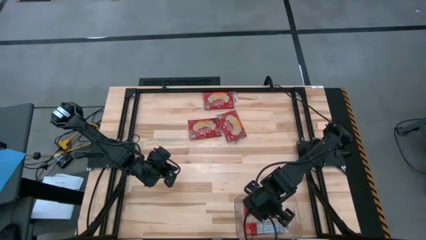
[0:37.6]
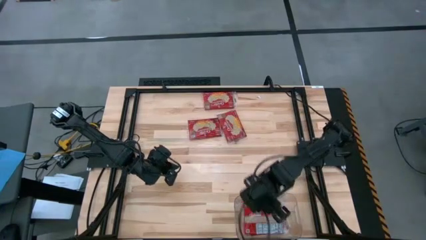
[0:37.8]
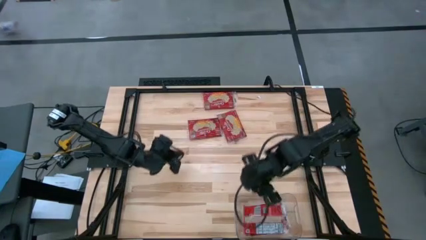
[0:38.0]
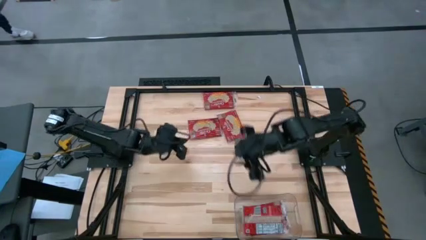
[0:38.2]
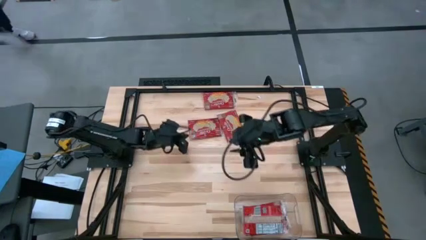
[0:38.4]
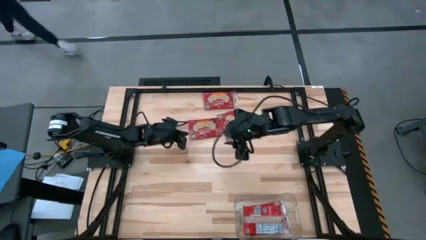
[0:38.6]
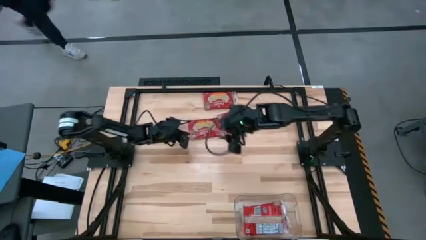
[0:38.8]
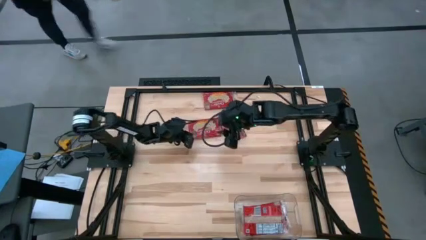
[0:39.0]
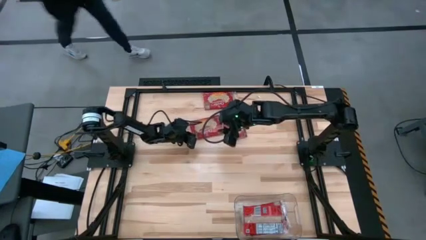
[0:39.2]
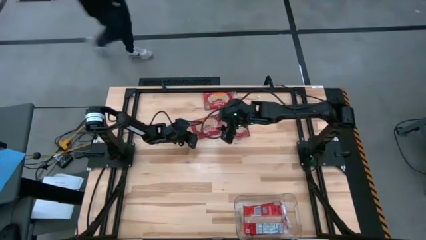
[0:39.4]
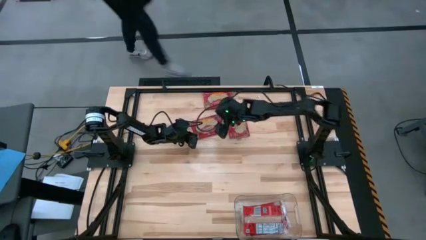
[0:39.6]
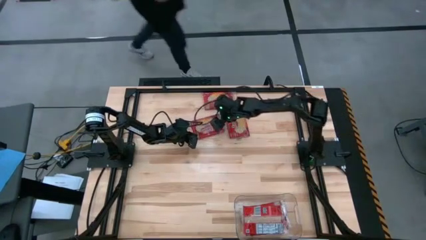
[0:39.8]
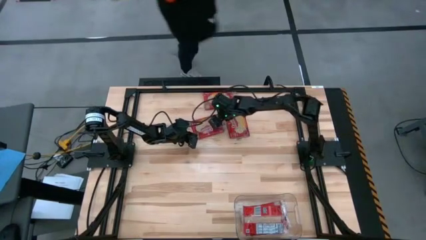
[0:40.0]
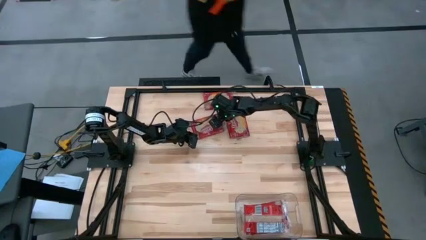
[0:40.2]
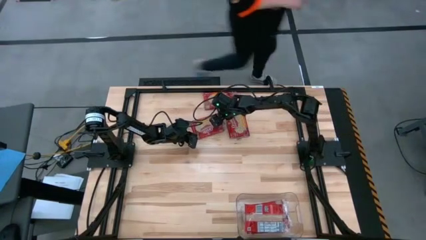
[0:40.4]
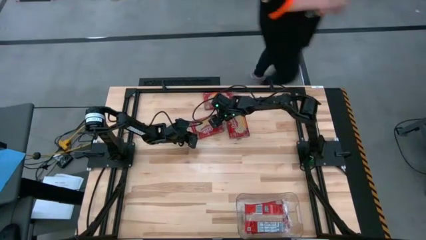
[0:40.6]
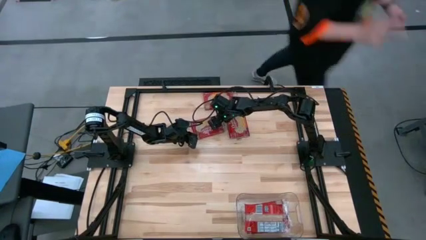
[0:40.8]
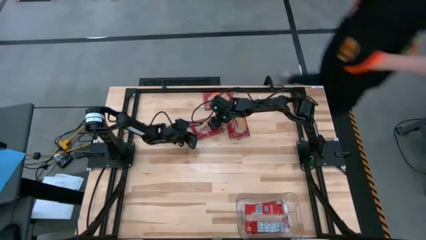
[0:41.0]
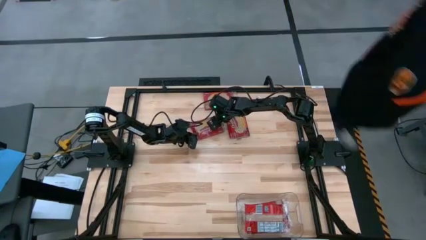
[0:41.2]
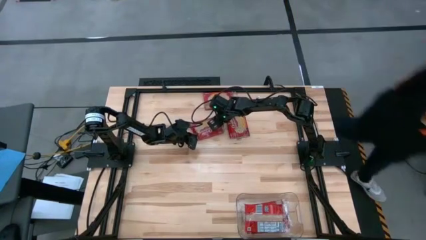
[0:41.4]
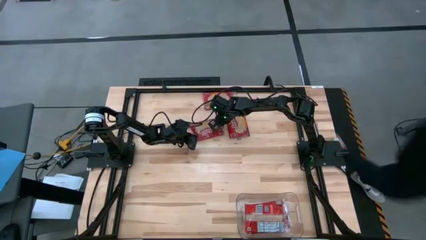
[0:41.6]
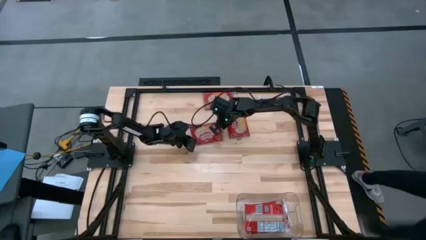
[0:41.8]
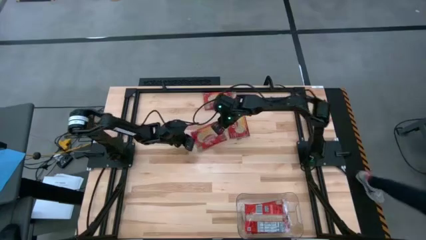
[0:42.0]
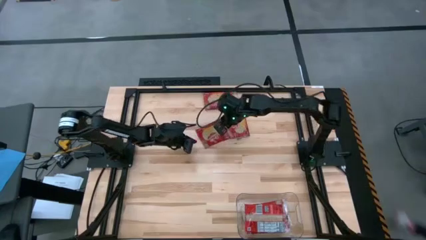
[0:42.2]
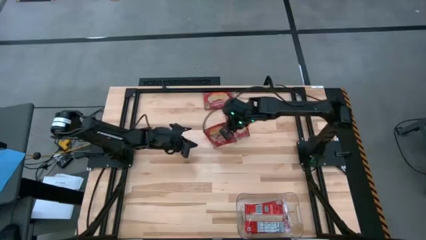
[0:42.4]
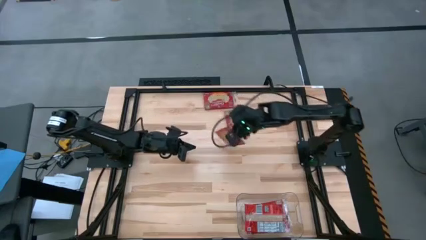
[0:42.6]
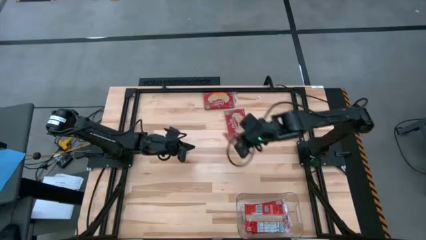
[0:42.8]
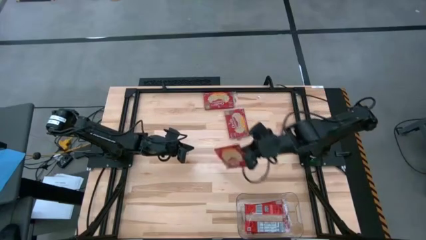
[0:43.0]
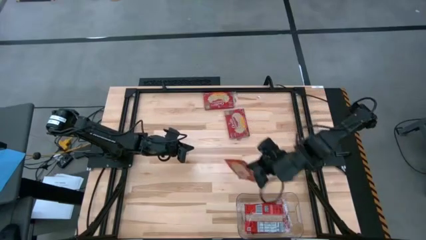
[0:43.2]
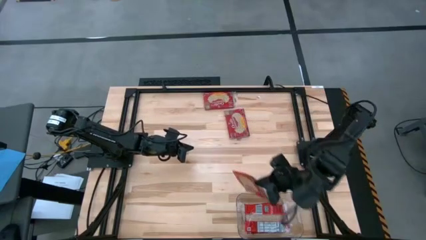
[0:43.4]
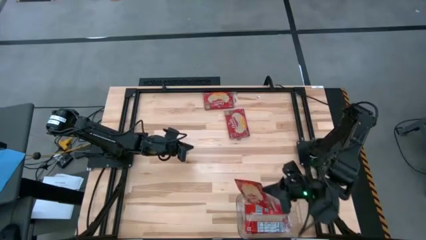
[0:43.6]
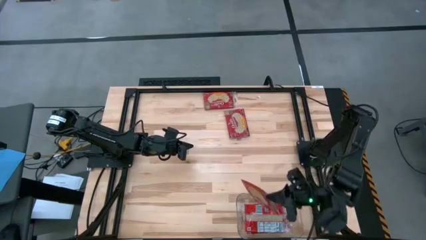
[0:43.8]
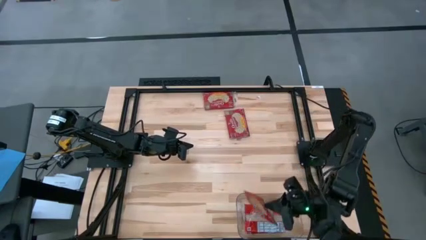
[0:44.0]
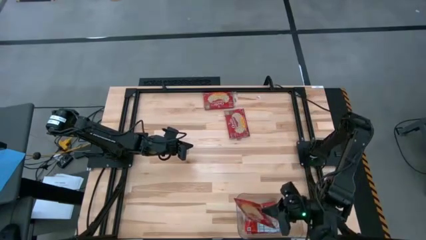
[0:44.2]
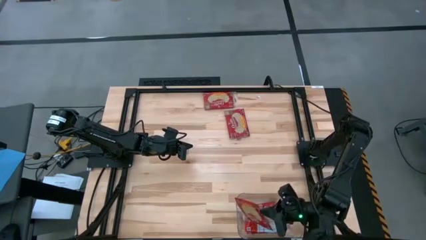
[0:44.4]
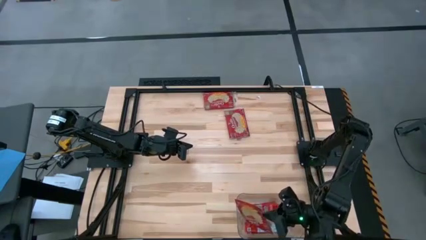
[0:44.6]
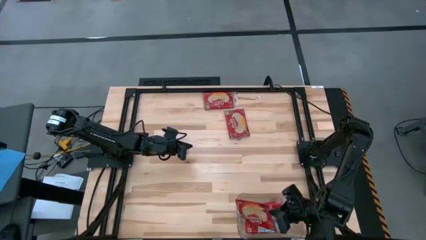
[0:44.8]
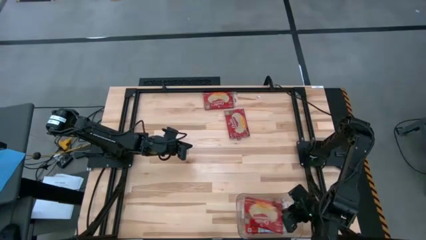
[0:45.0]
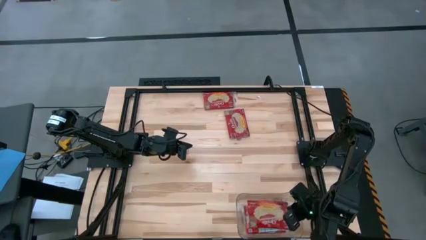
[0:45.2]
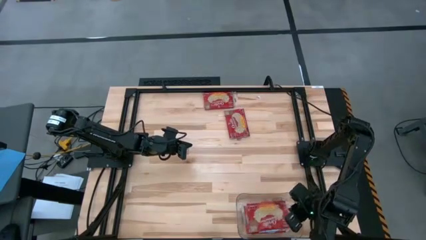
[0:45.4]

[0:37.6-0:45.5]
Task: Sort popcorn bags into baskets
Put the red popcorn bag into the transparent bin

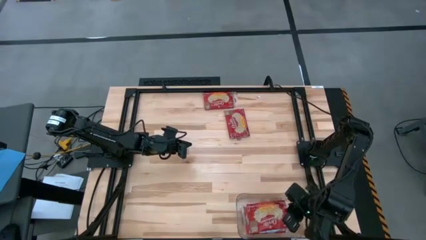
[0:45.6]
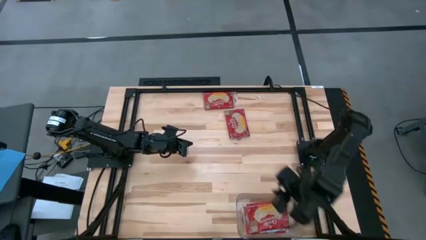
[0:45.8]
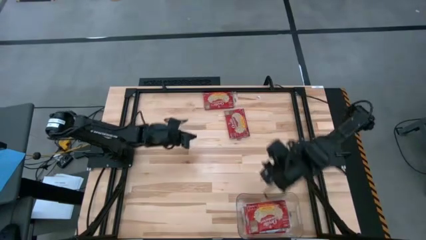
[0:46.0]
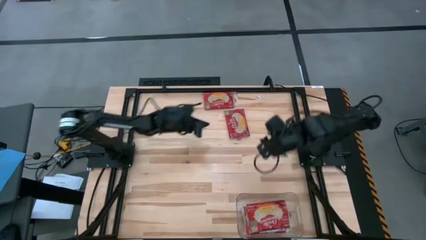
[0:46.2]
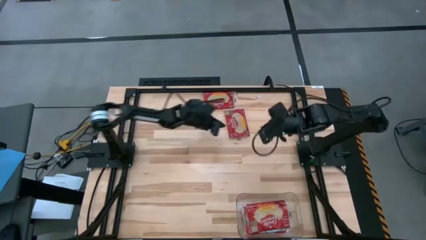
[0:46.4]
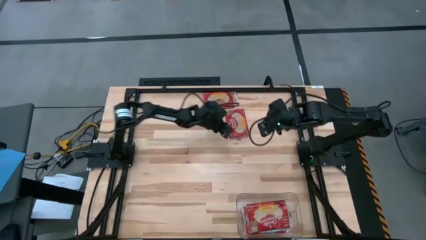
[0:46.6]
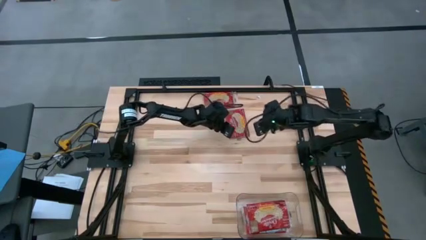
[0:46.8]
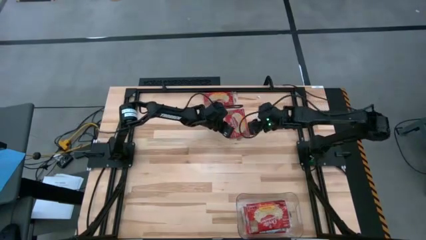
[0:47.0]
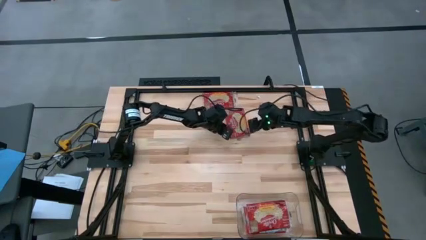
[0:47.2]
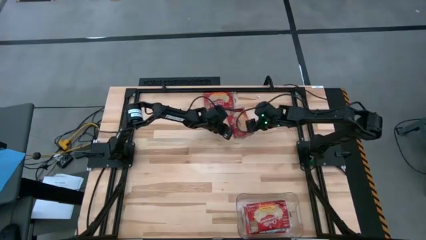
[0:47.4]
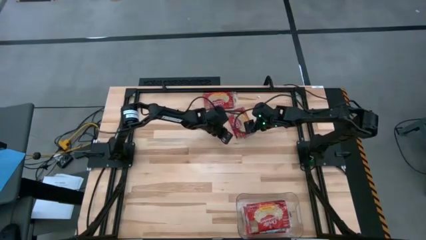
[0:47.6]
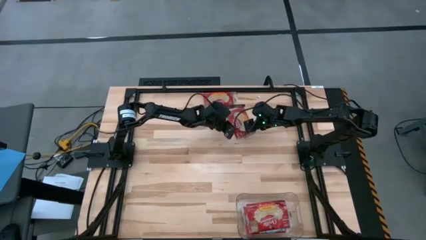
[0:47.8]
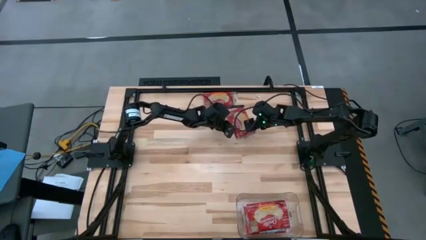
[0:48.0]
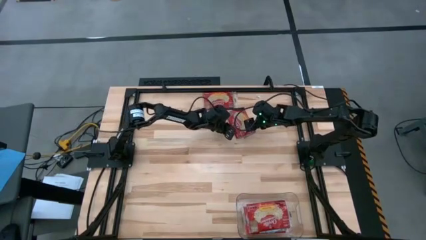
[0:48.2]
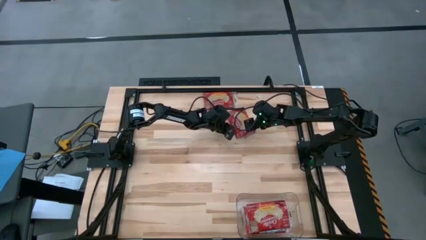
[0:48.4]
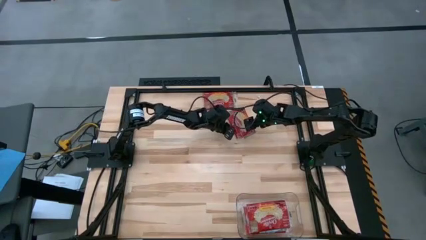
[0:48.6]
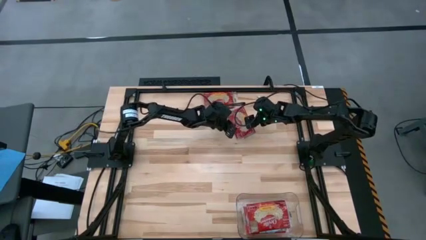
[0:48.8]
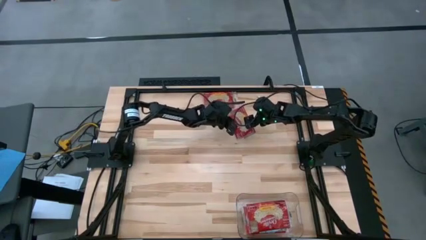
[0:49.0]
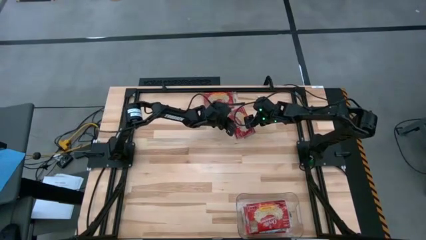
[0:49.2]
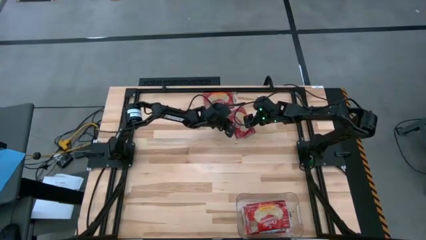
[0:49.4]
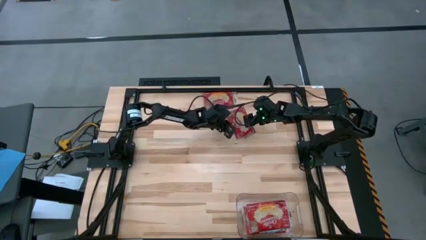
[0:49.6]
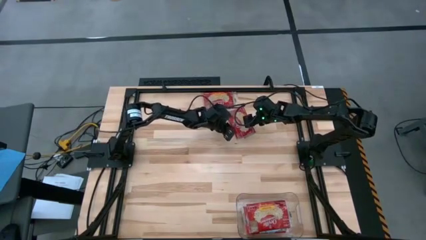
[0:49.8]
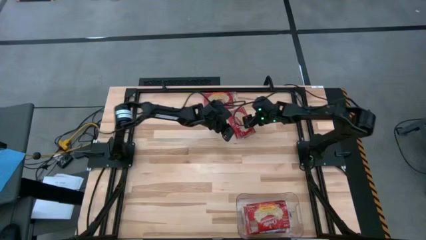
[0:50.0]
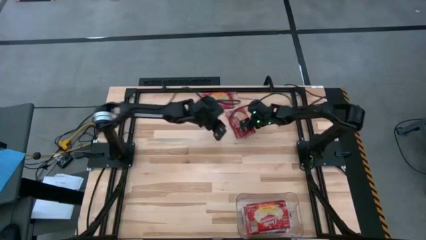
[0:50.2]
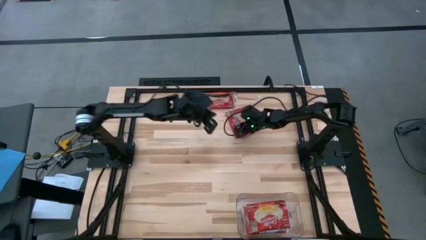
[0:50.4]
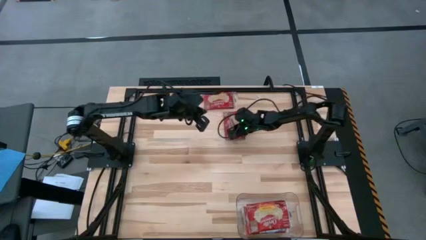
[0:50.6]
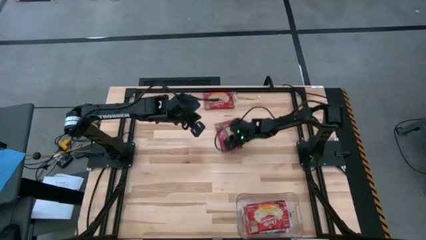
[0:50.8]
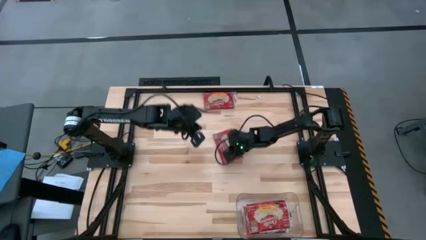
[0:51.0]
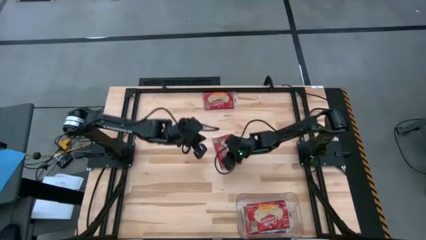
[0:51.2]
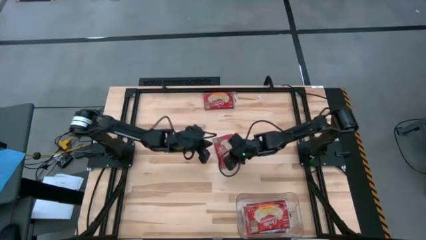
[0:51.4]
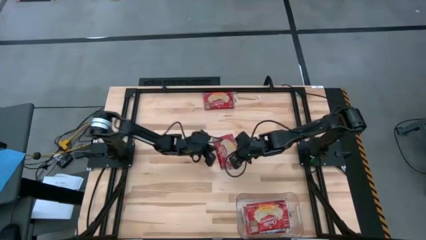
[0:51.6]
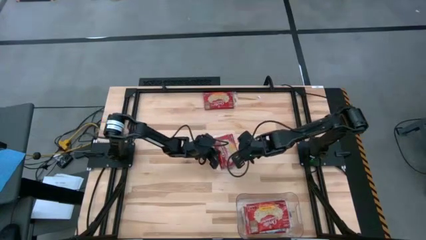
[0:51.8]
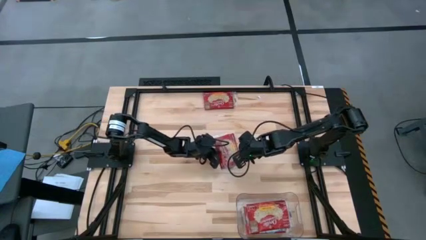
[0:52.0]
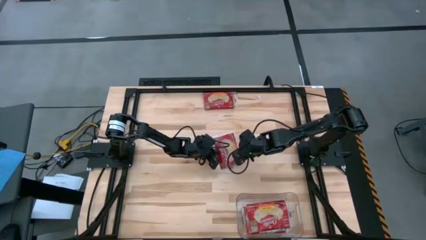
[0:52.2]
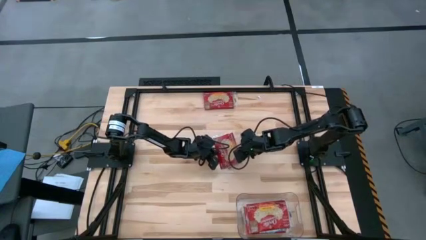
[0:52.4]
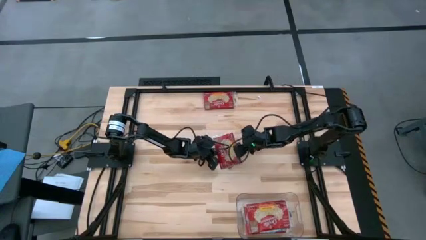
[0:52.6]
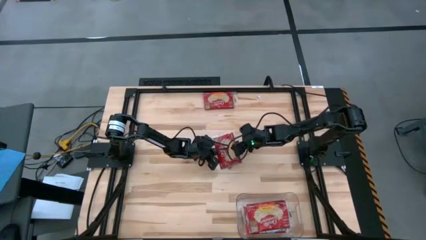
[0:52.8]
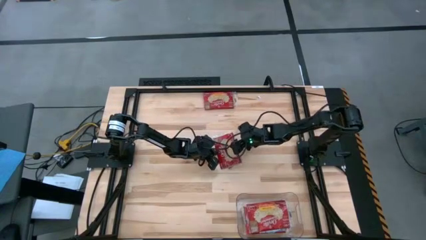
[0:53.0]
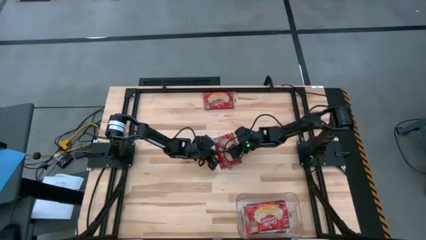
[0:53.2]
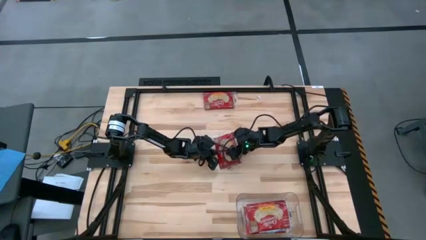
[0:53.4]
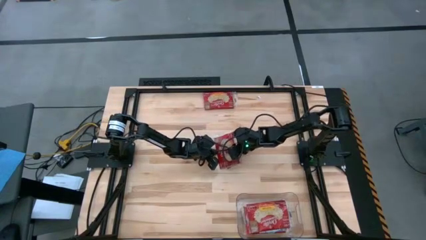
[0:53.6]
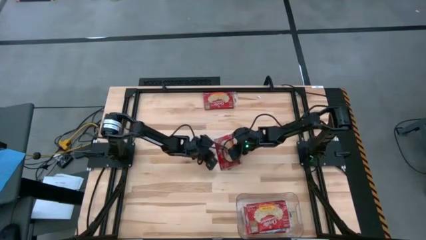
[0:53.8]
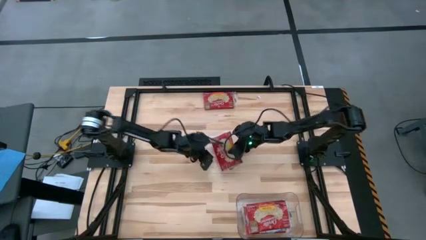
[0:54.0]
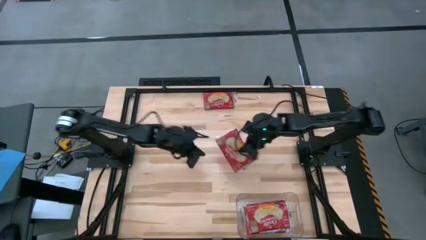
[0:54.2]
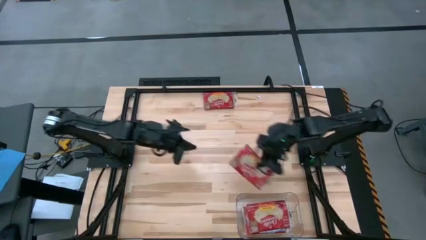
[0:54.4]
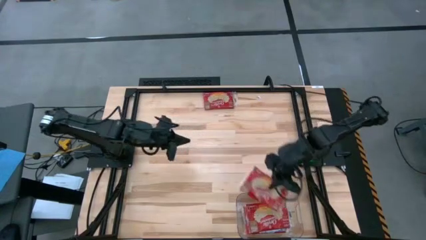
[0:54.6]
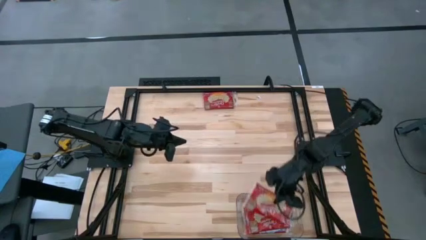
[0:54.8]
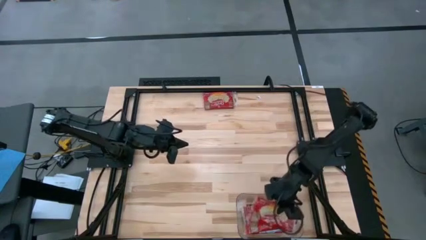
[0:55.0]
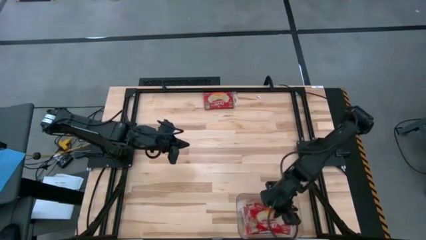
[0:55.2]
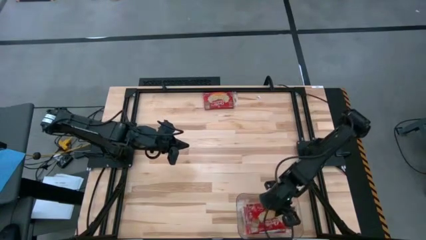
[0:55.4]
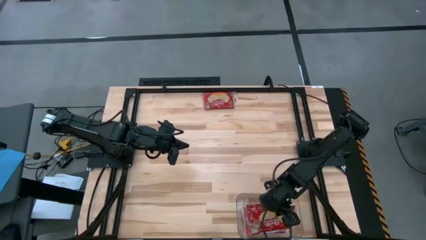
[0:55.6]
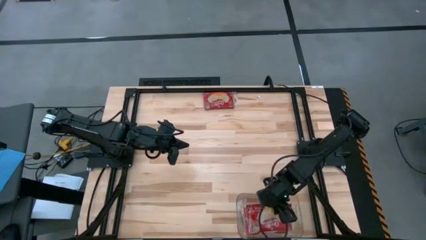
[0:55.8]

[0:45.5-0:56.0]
Put the red popcorn bag into the transparent bin
